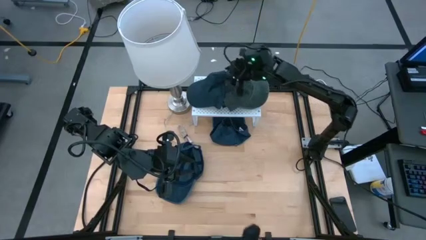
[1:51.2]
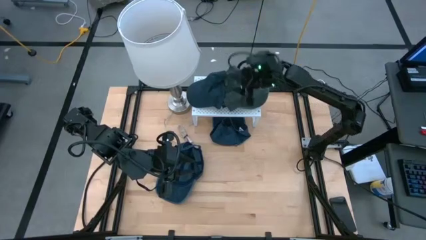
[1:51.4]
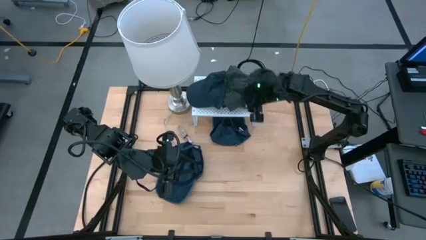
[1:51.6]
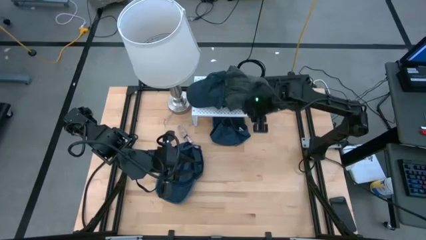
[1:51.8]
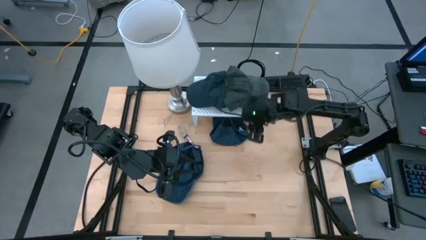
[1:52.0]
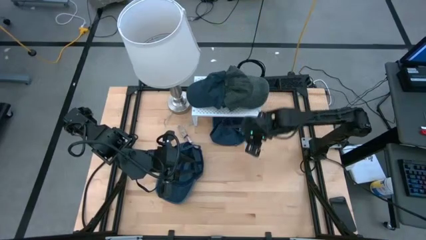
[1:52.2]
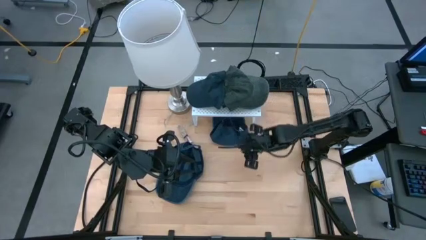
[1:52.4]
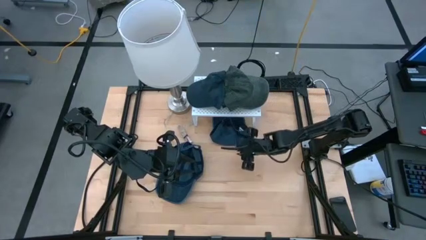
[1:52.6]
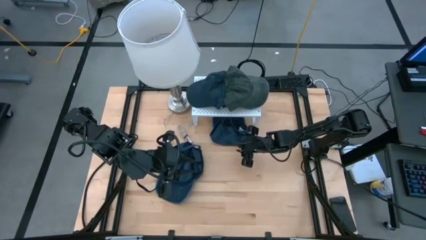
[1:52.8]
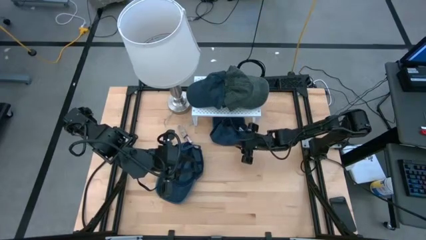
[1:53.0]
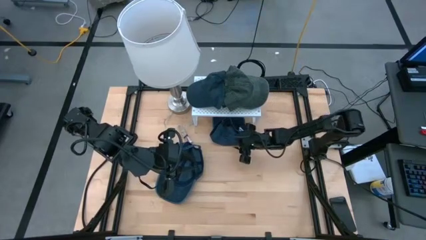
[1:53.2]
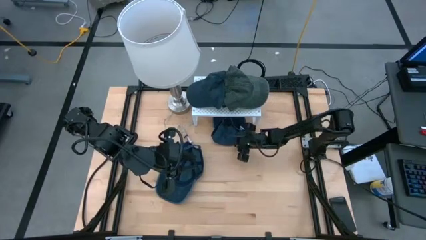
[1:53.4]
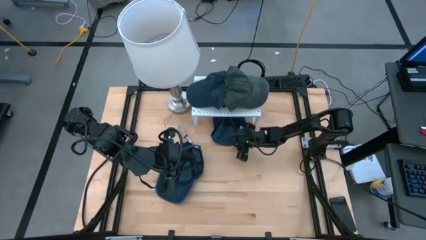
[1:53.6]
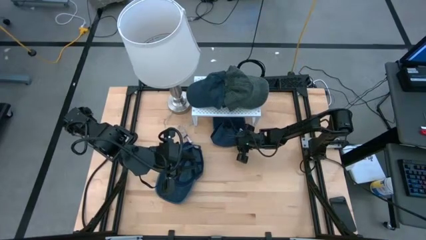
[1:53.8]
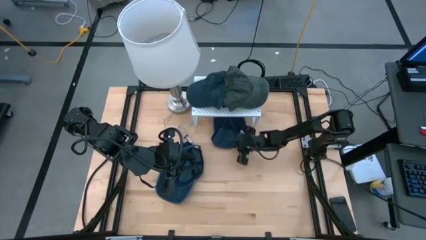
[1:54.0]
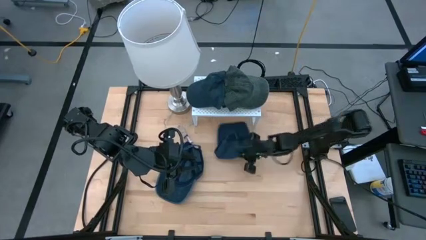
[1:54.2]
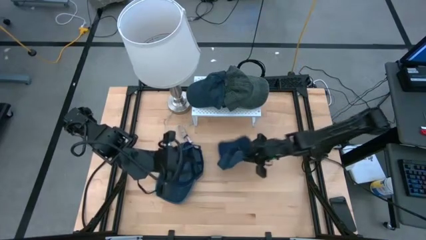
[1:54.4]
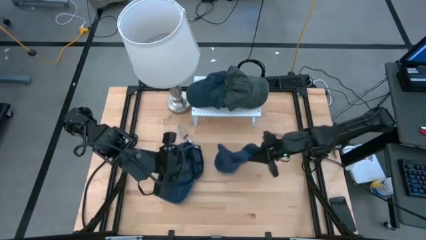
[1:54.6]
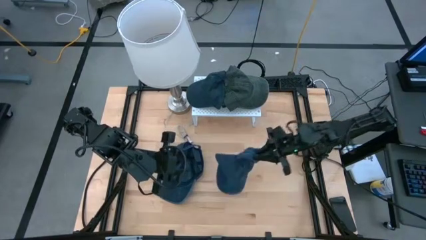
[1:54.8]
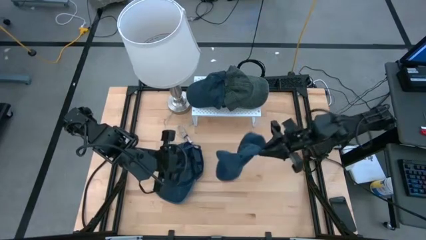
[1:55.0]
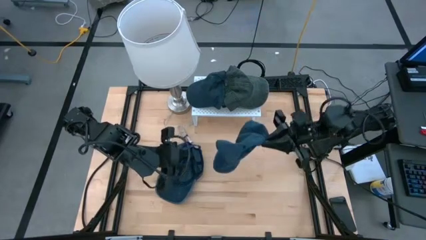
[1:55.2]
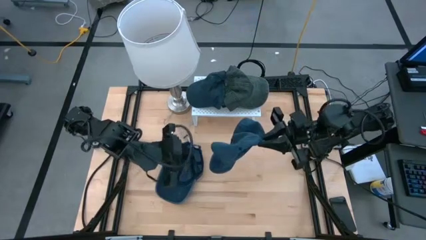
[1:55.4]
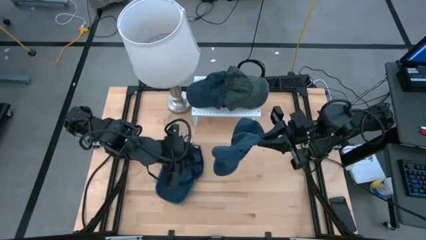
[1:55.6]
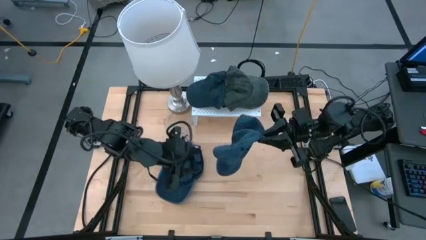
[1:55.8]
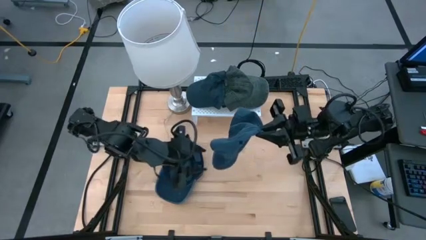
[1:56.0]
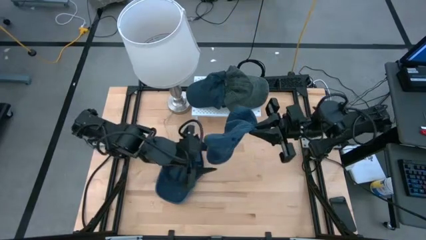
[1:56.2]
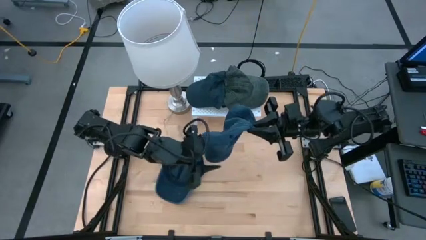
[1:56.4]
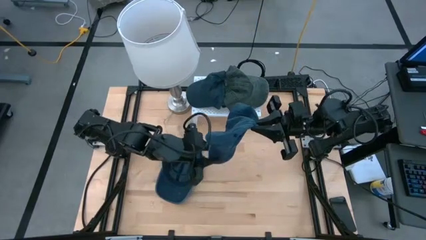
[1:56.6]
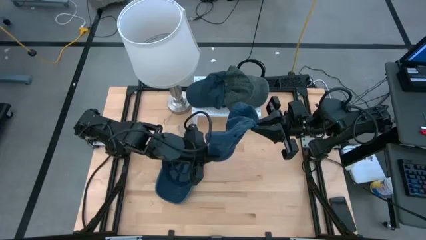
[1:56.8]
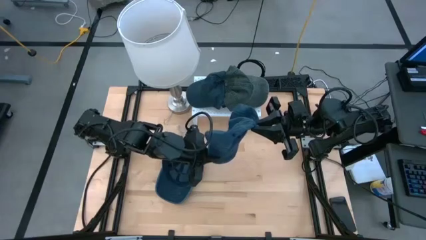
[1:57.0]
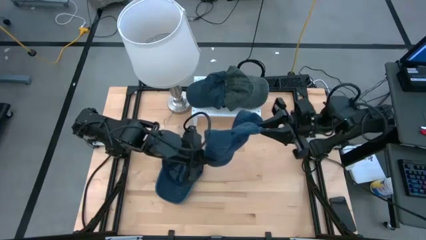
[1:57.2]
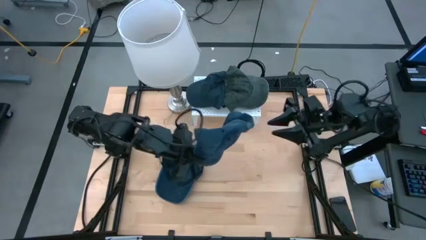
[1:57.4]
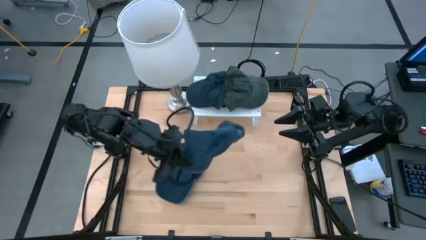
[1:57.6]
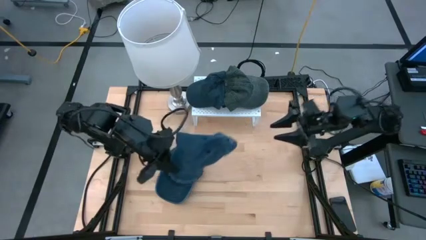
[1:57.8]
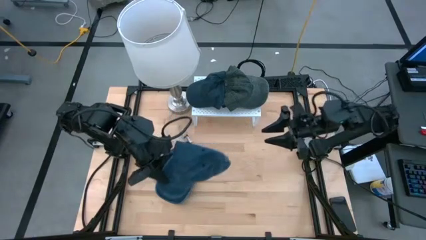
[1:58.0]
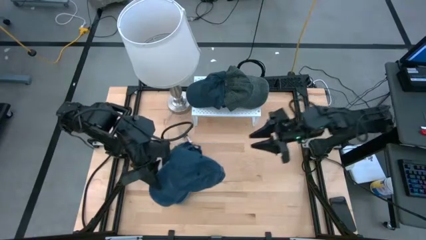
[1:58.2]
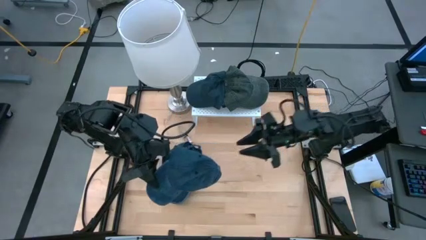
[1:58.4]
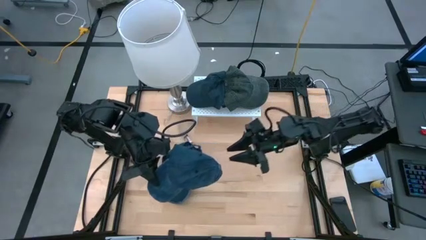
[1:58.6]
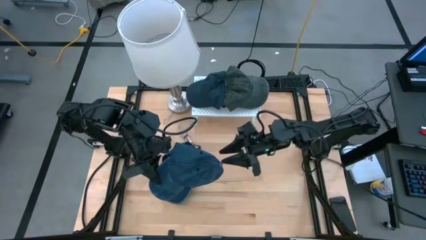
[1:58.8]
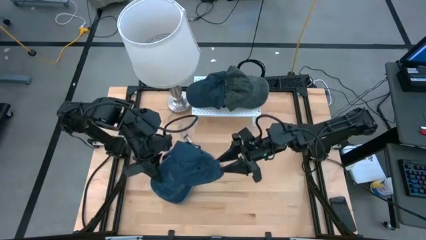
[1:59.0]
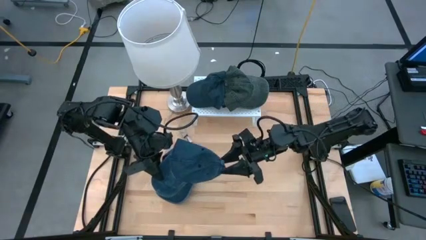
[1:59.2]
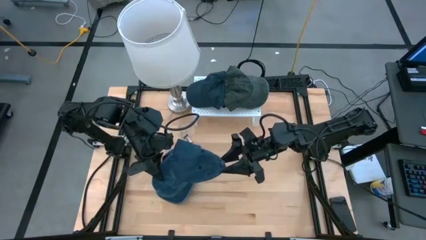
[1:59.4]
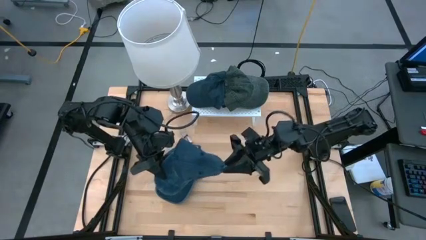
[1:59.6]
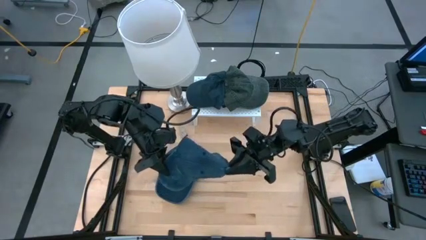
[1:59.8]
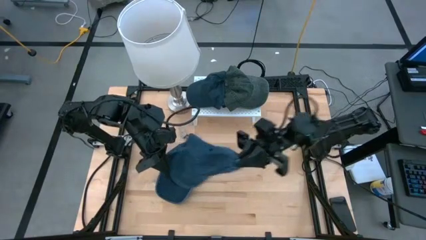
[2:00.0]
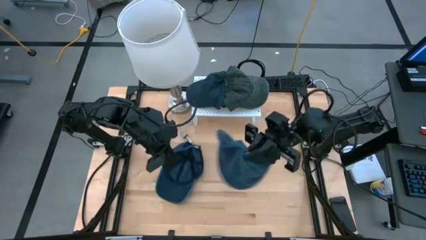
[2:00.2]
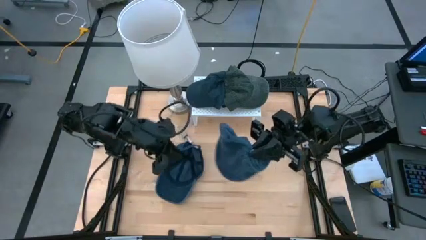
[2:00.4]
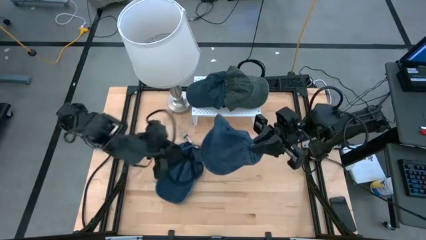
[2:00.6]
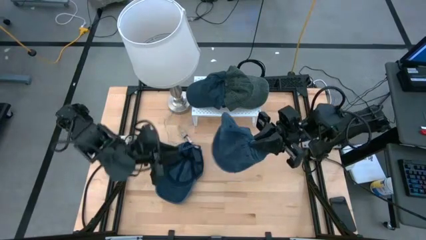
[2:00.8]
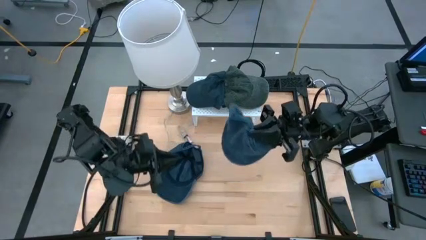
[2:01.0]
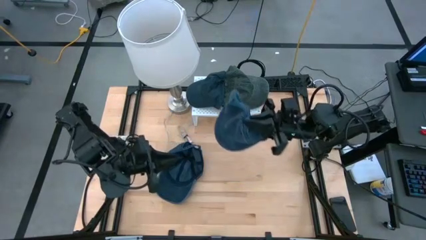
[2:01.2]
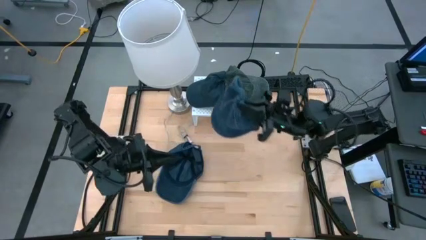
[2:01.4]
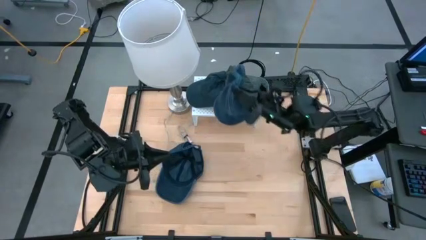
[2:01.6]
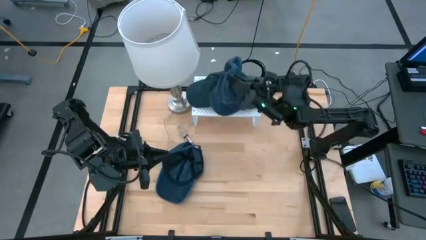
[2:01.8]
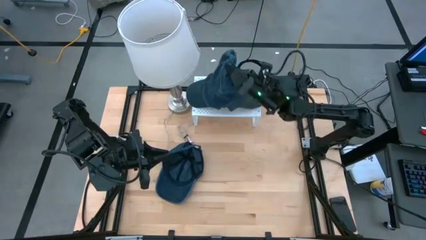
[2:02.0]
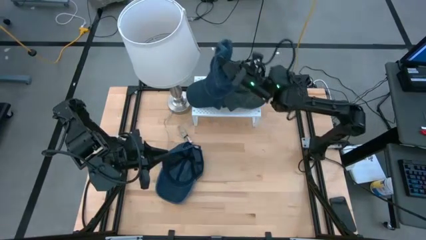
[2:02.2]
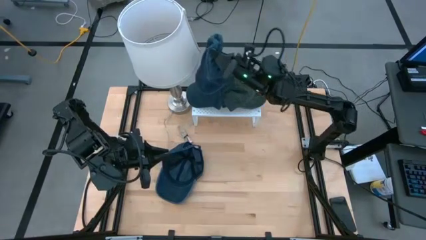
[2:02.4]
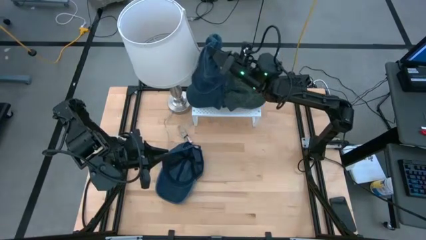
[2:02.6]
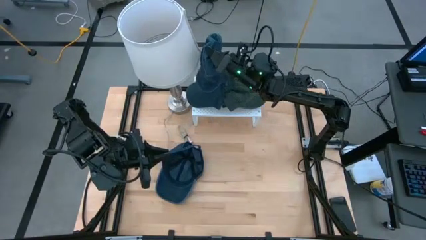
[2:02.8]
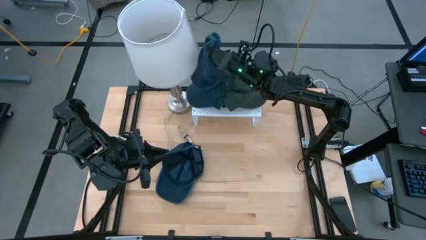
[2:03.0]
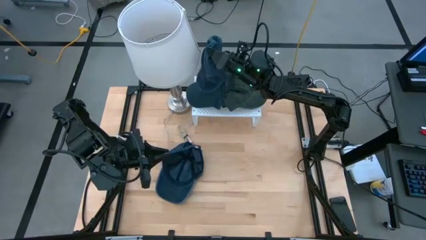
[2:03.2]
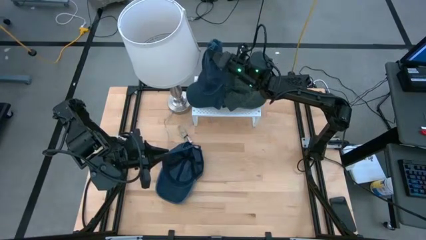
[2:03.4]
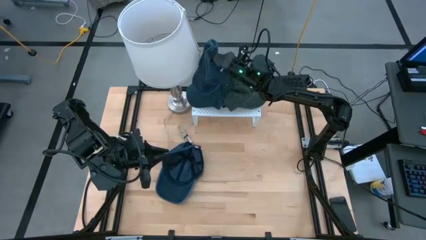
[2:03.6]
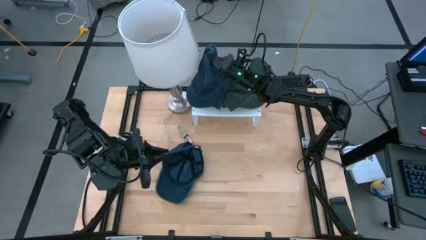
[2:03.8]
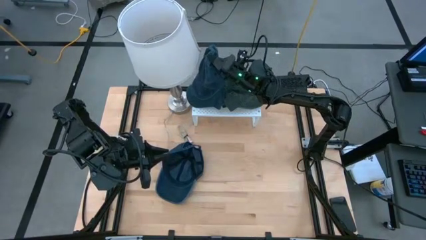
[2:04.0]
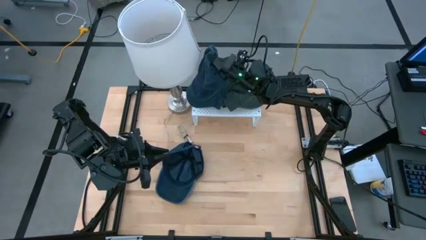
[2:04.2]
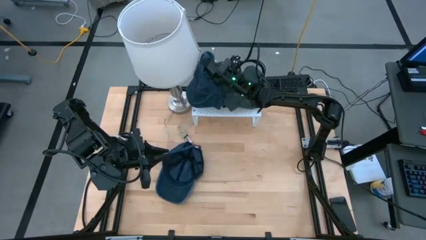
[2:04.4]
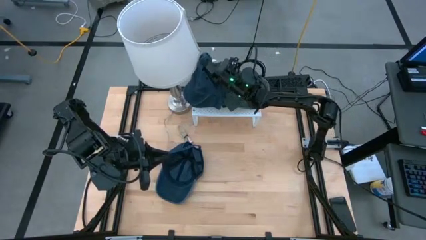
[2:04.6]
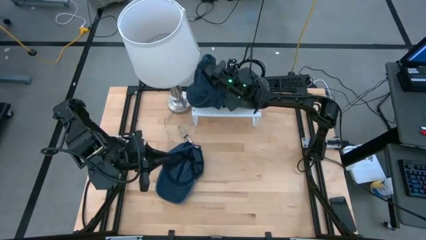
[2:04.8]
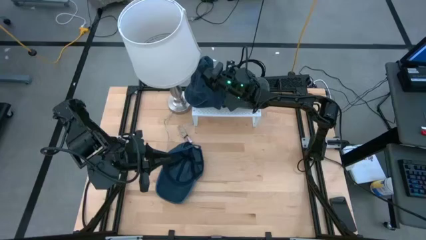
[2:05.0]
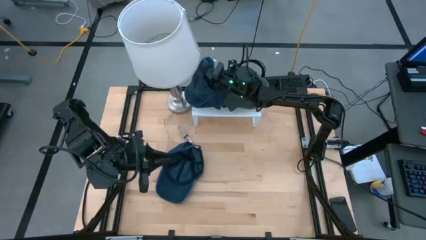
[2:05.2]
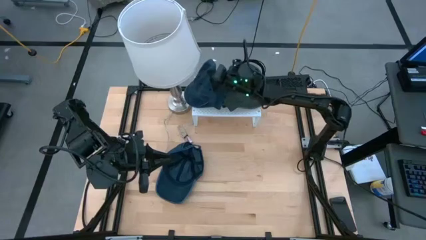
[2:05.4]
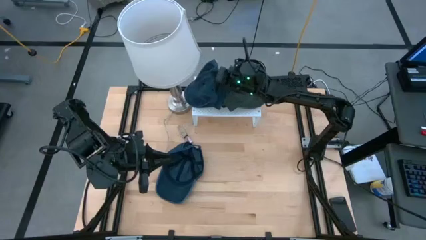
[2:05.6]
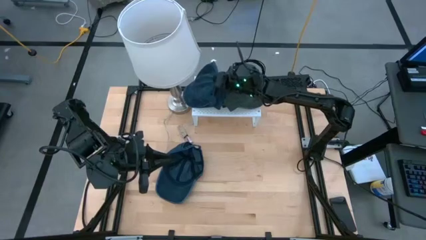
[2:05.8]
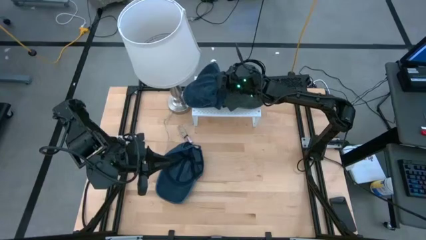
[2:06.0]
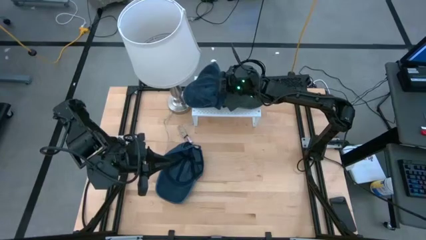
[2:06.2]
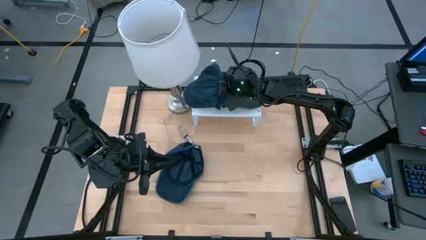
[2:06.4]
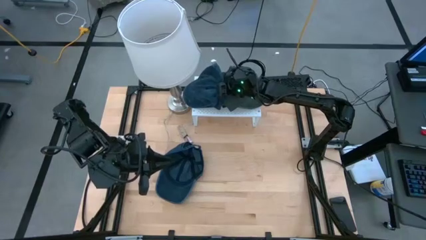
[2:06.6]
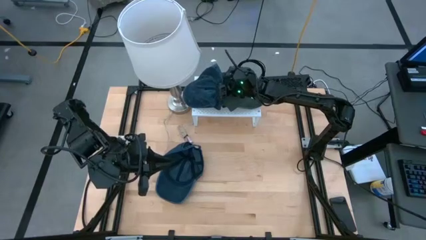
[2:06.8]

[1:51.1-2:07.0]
Task: Pick & Place hat
Stack the top blue cap on the blue cap on the shelf
